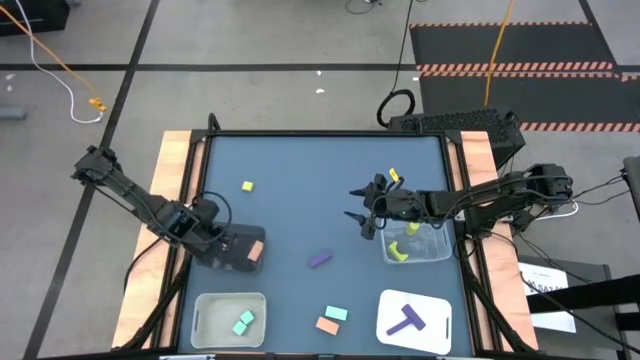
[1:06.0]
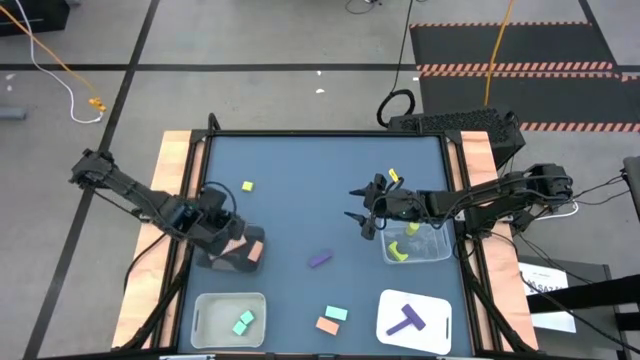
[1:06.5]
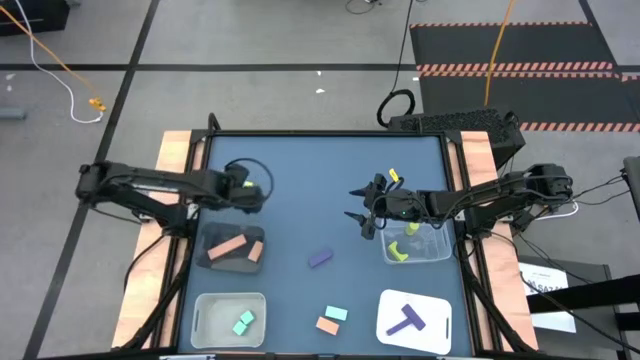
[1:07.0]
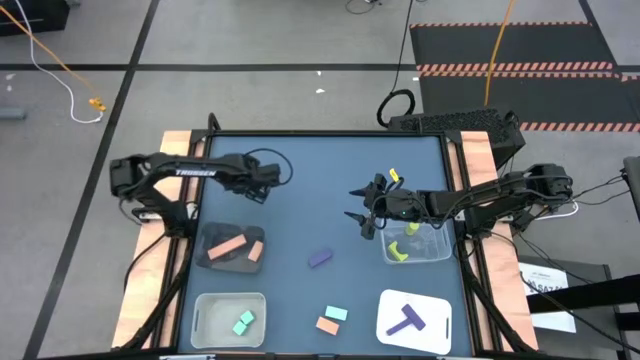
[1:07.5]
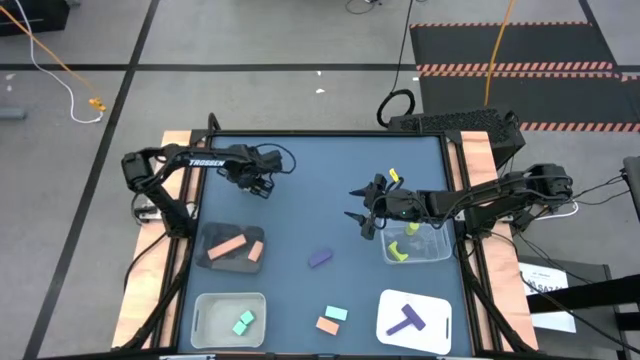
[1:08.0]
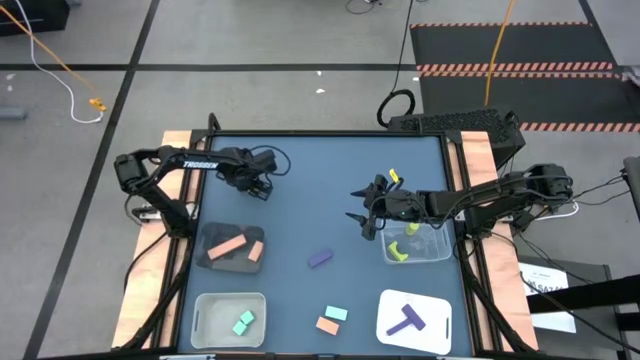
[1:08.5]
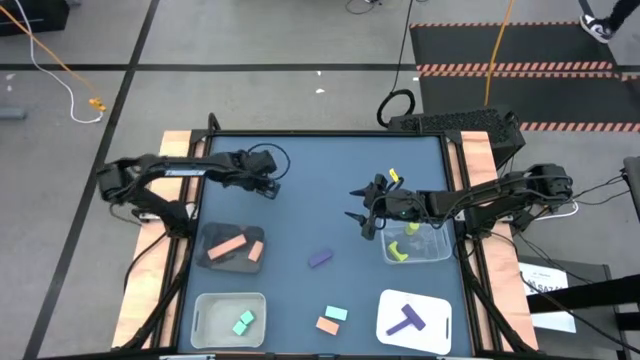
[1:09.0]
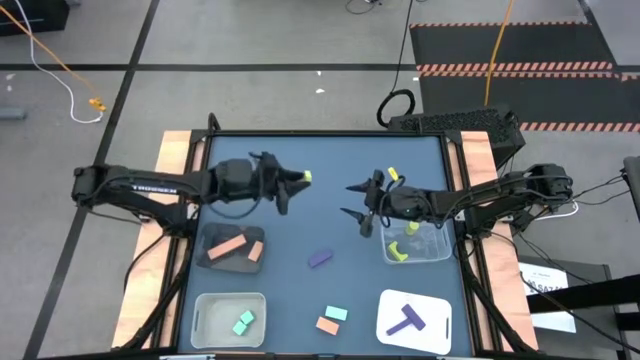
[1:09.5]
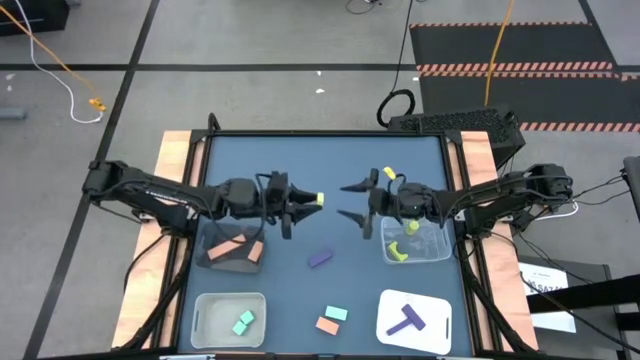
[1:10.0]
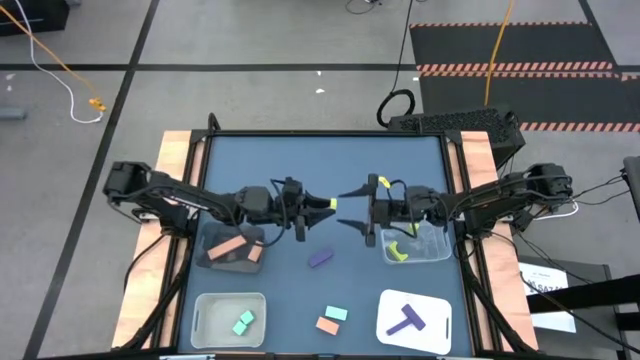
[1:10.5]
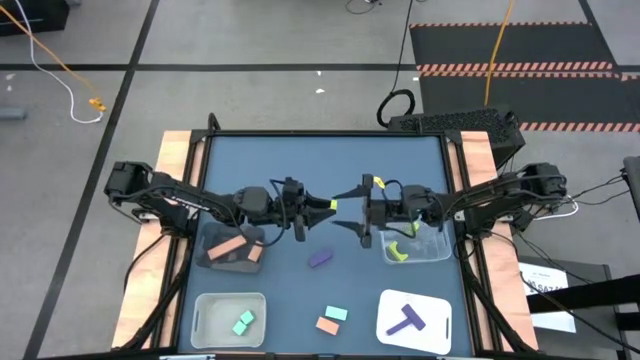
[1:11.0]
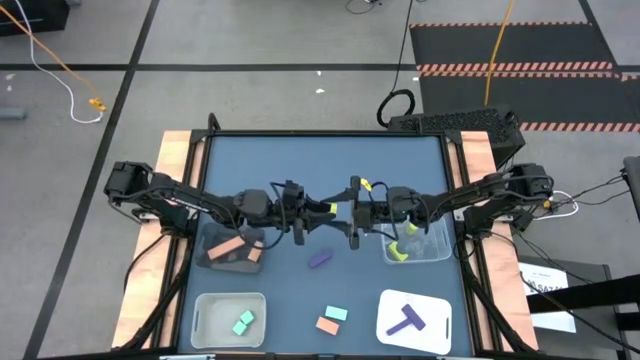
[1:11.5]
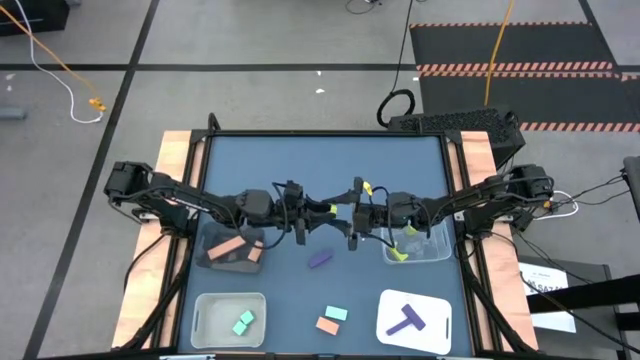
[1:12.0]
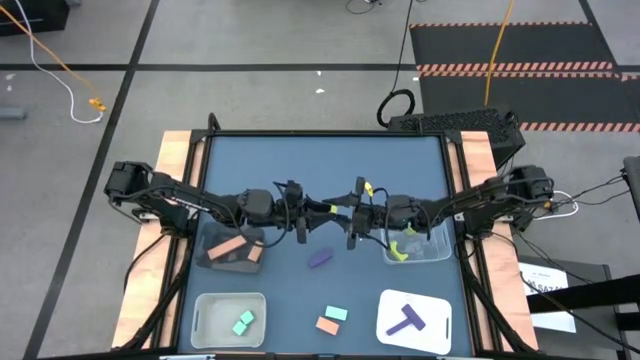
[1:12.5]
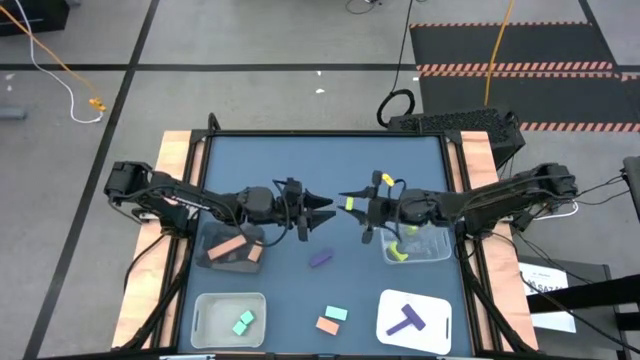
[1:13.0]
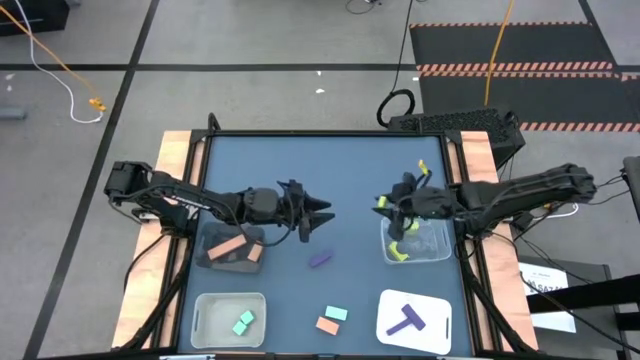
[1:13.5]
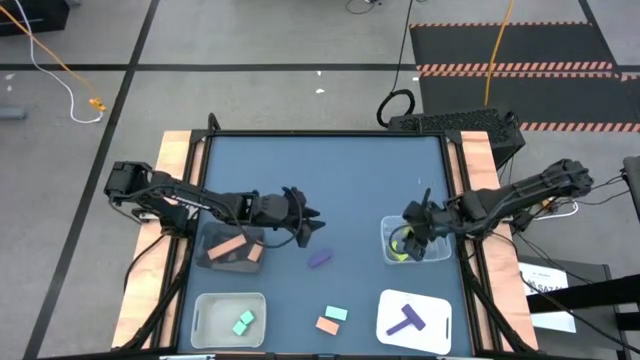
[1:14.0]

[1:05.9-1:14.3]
Task: Sort & place blocks by color
Put the green block into the transparent bin

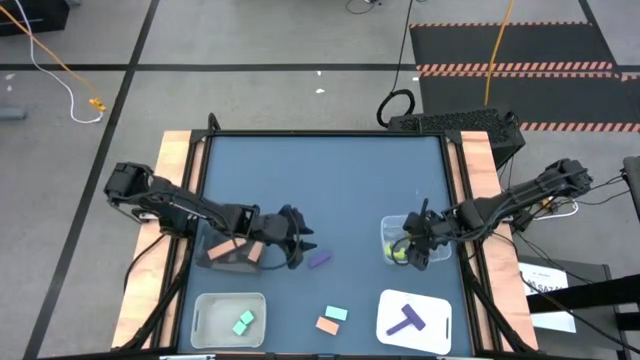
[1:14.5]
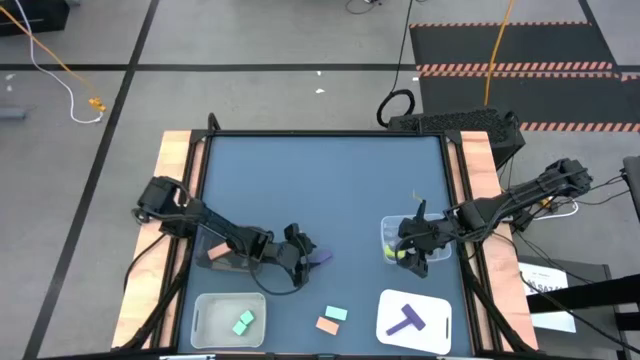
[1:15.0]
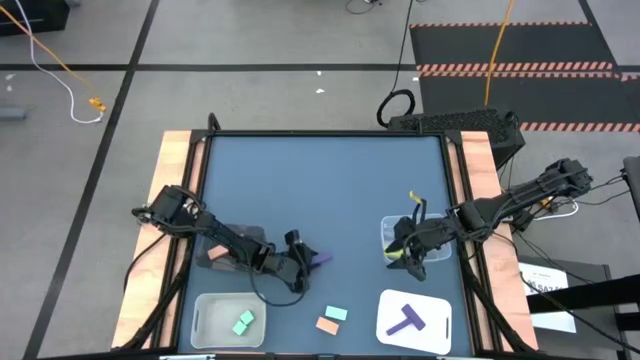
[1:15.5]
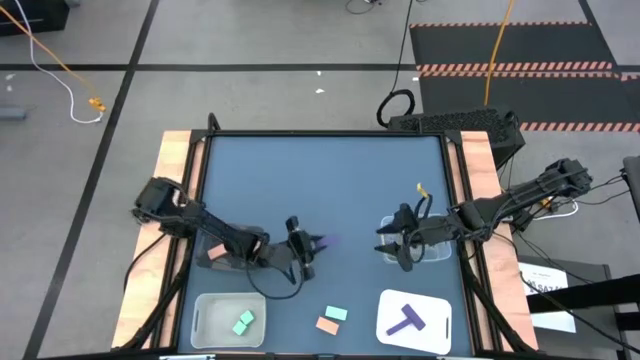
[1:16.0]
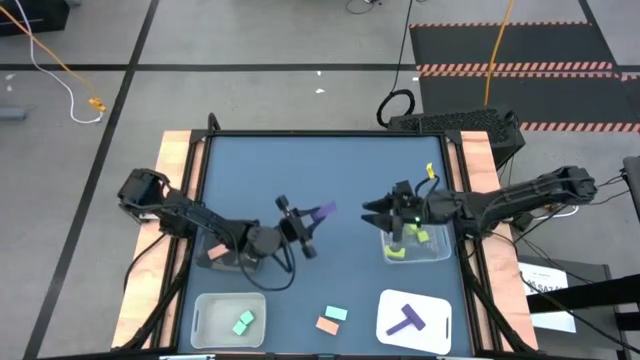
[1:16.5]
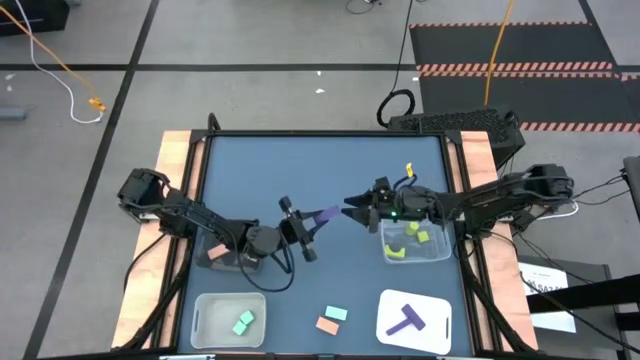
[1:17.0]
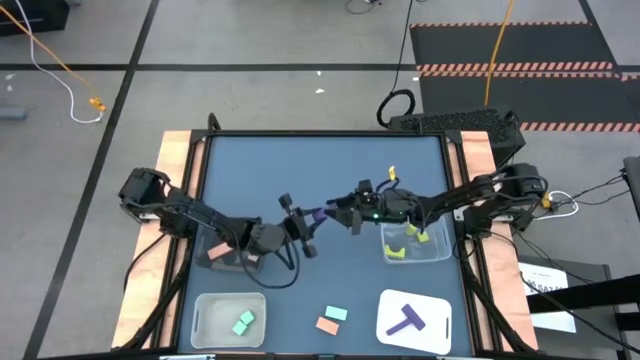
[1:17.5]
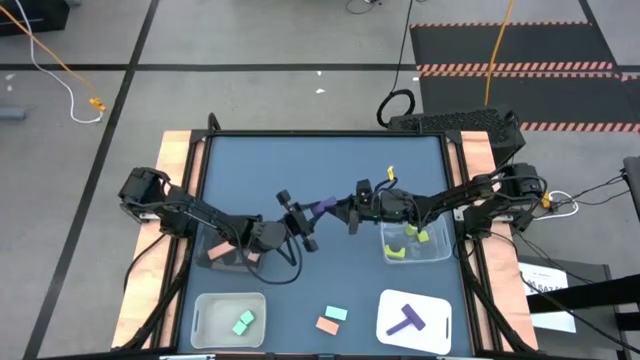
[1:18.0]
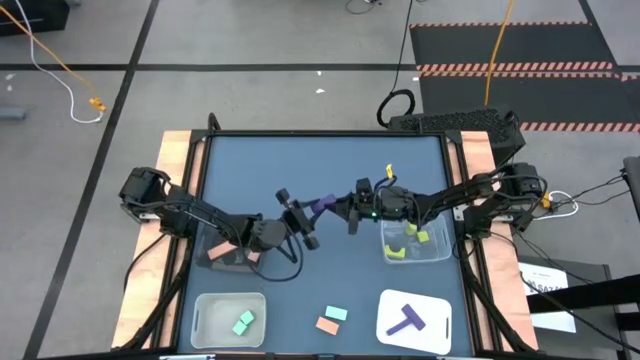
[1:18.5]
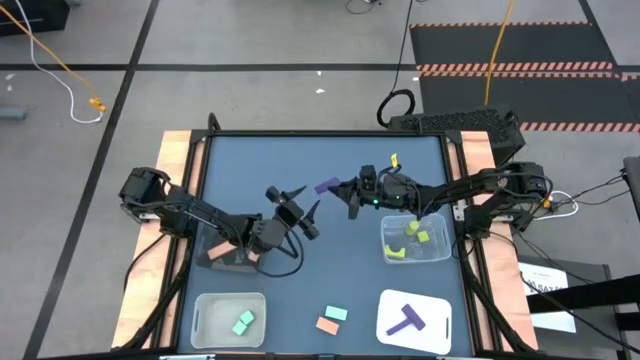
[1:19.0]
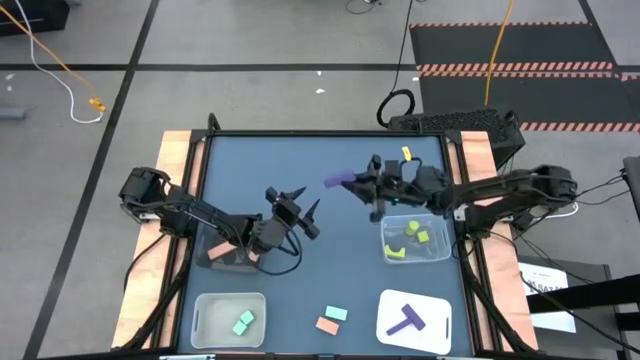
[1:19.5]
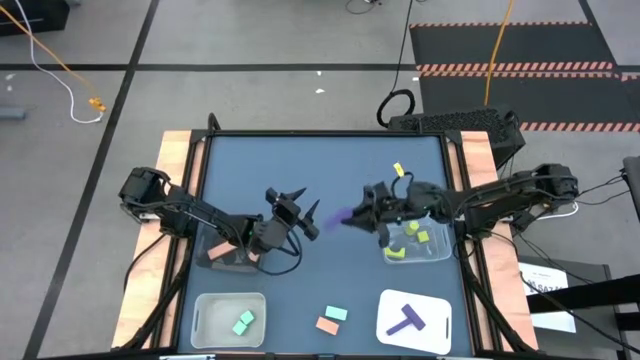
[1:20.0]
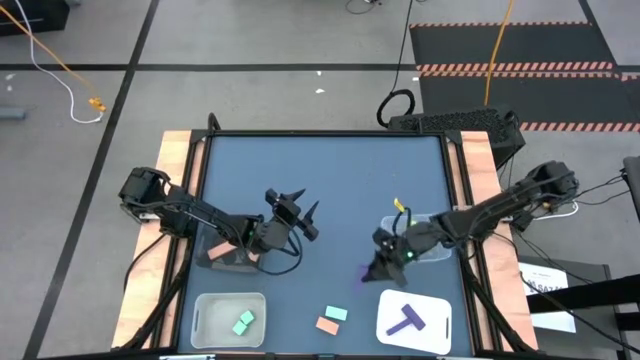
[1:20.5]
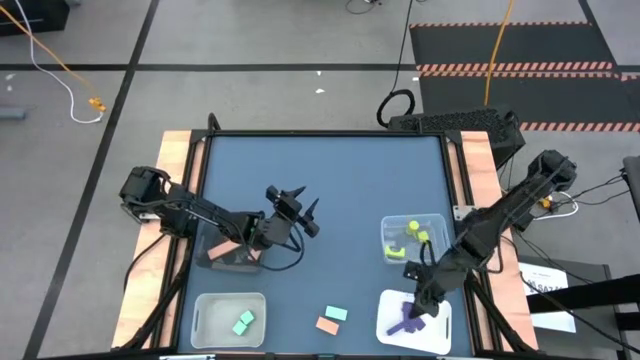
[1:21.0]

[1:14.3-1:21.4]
Put the violet block into the white bin

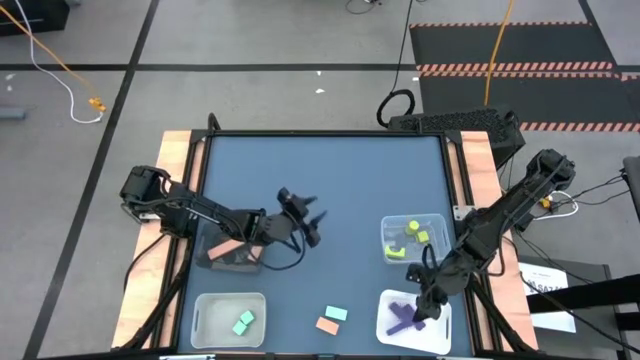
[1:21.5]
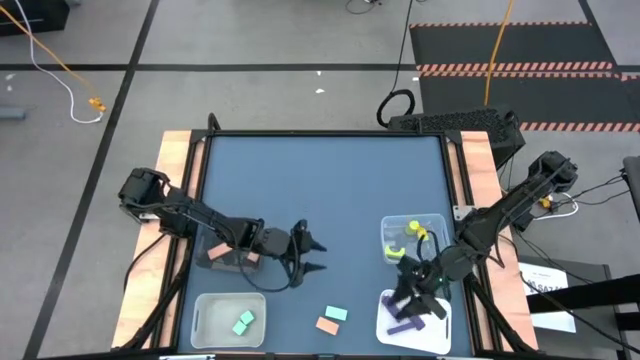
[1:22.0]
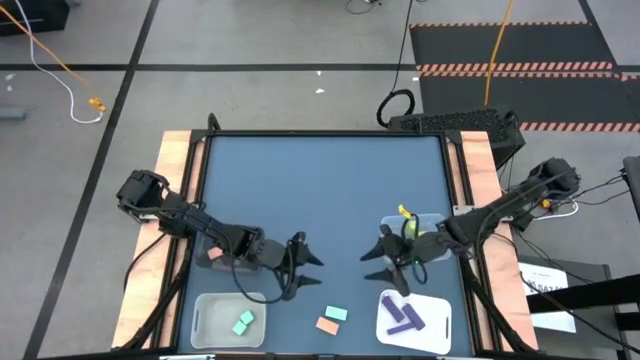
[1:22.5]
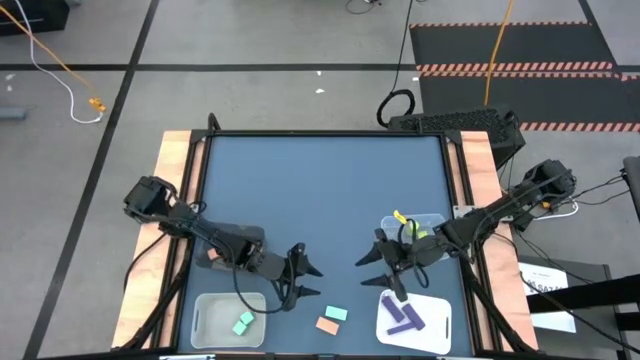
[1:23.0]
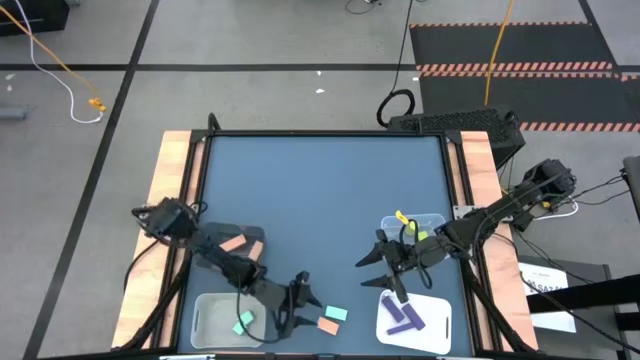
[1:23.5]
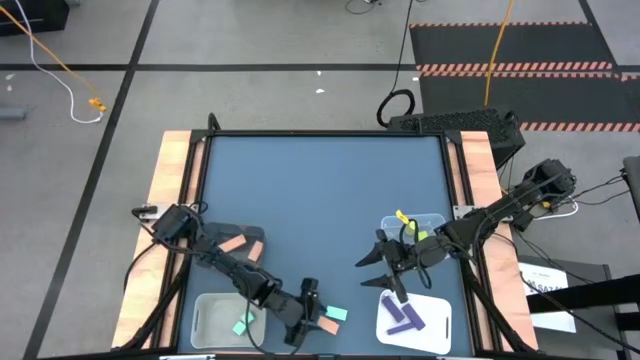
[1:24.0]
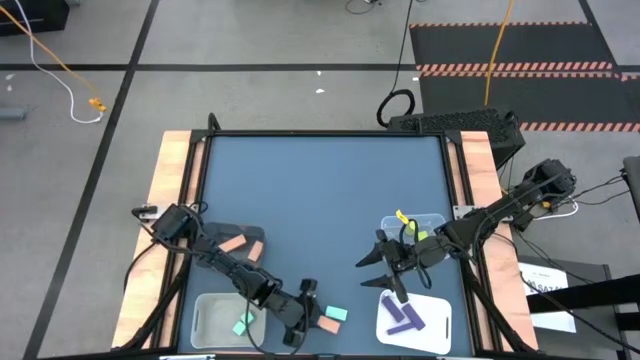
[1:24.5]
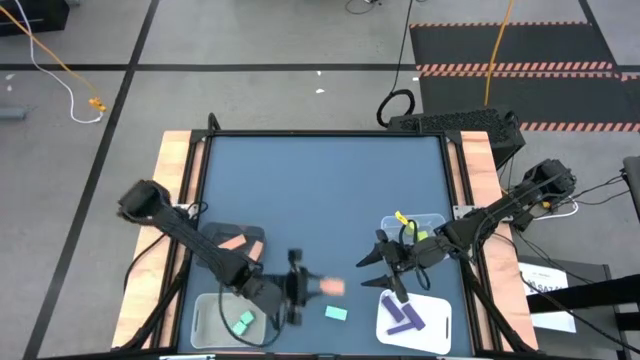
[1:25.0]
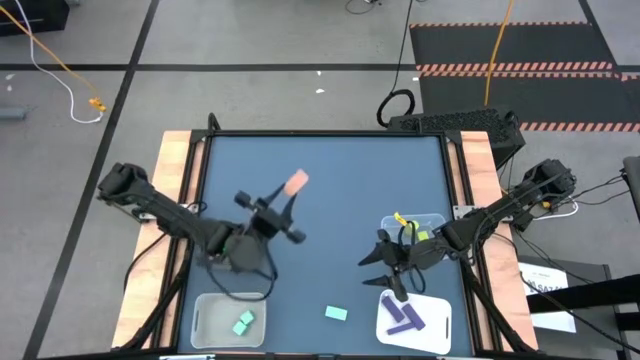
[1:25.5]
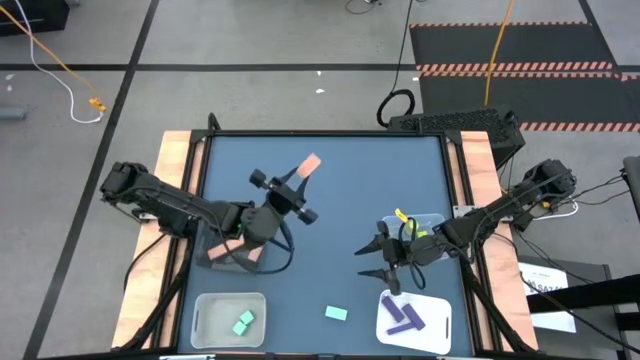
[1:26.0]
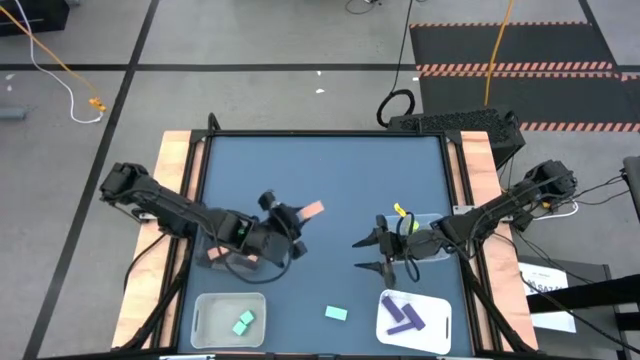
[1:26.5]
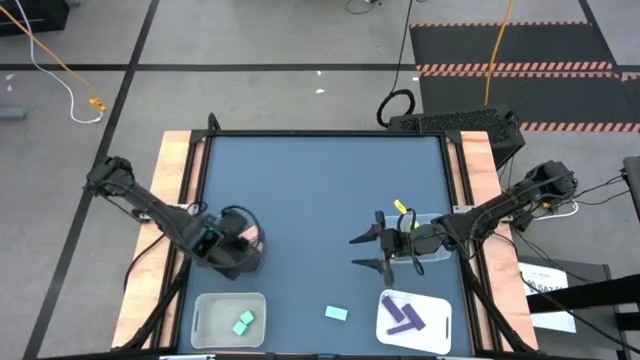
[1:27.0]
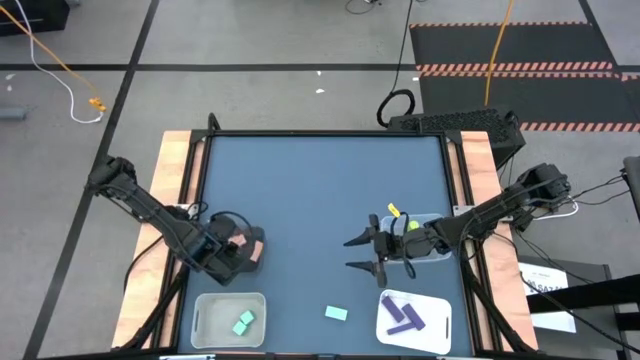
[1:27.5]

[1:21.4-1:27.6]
Put the brown block into the black bin
